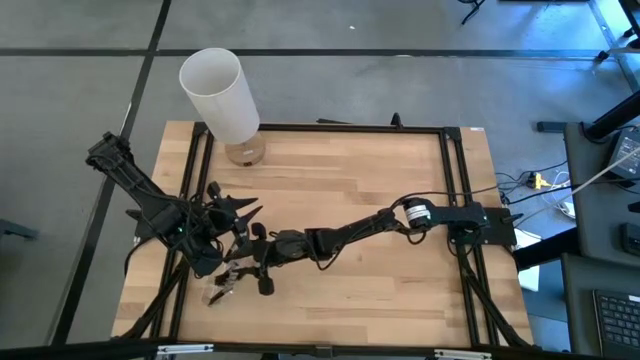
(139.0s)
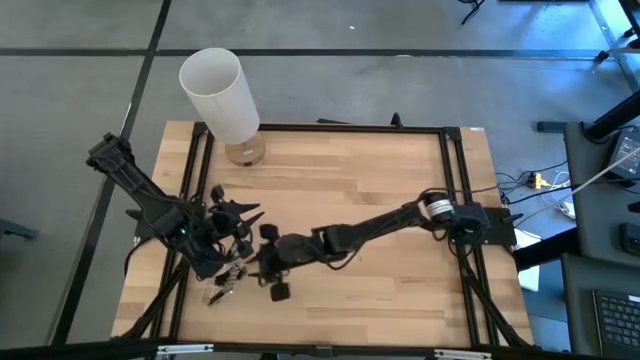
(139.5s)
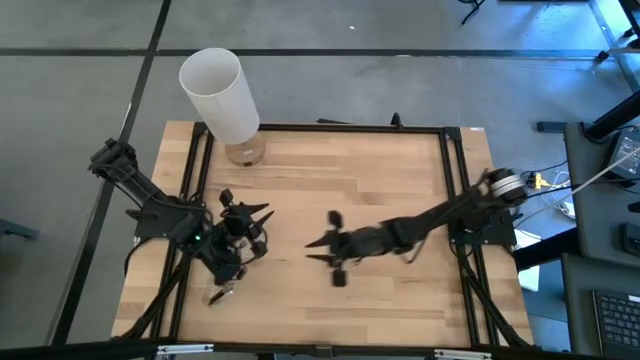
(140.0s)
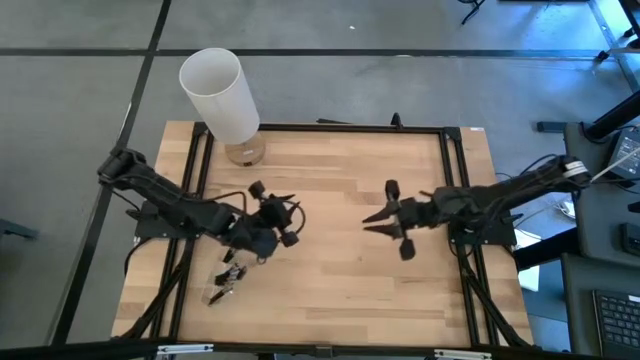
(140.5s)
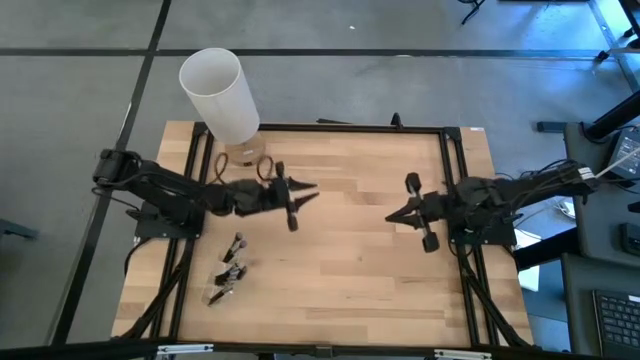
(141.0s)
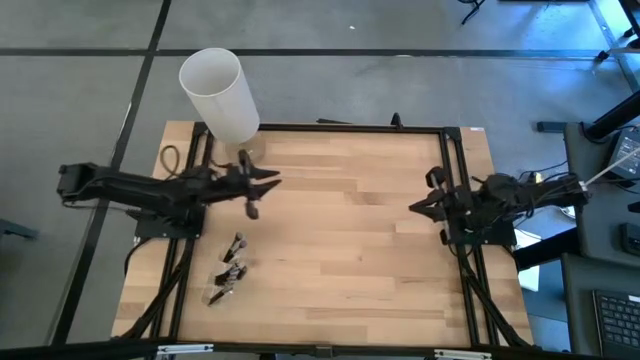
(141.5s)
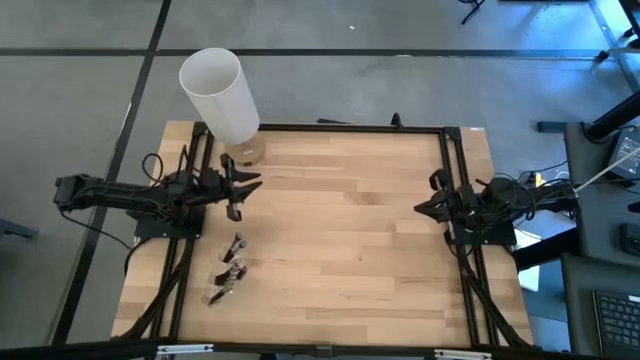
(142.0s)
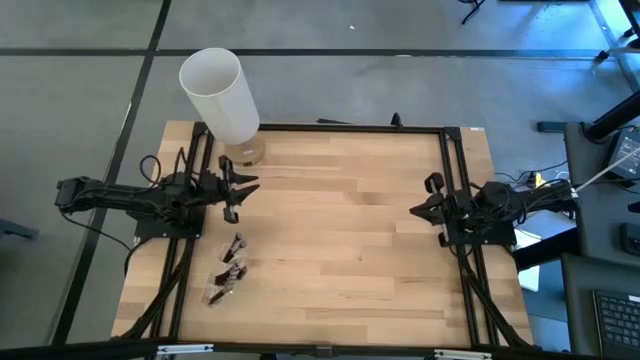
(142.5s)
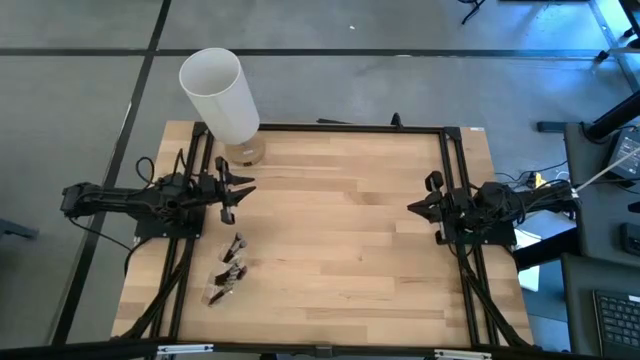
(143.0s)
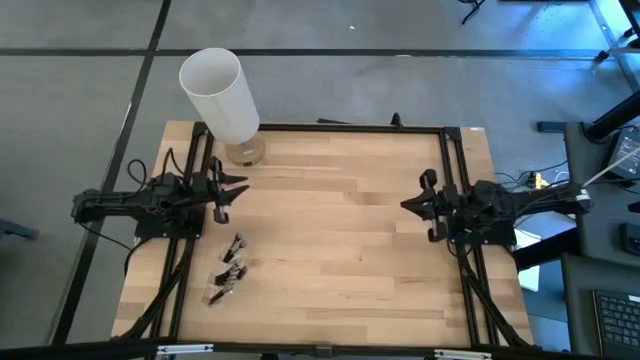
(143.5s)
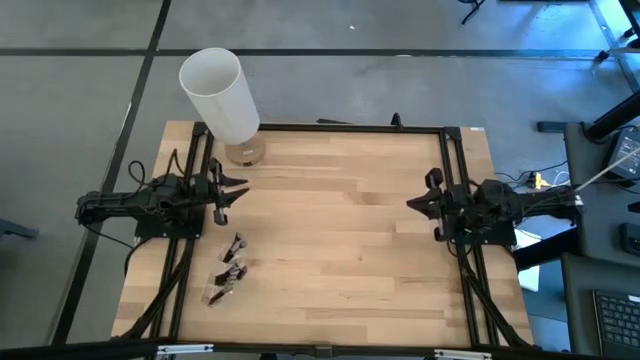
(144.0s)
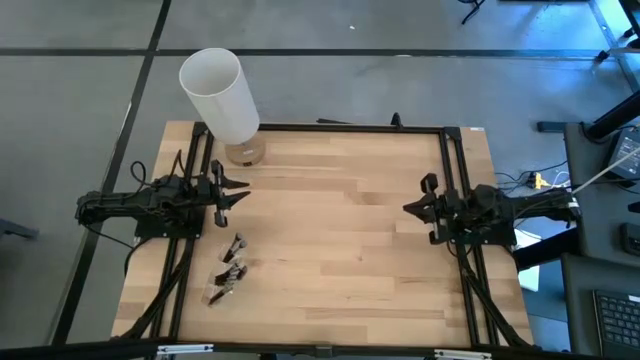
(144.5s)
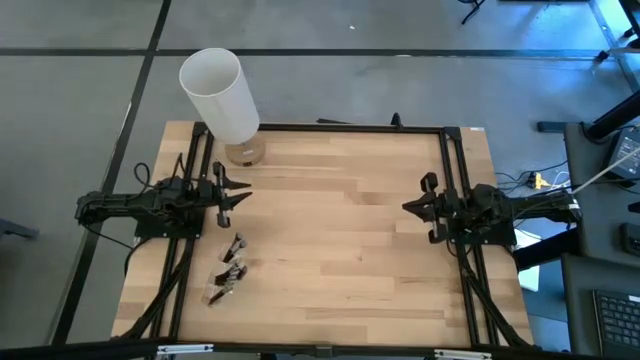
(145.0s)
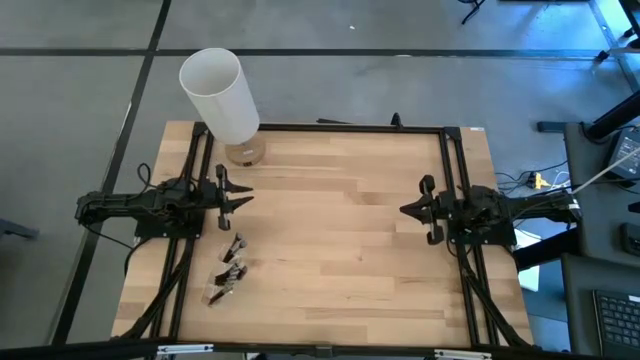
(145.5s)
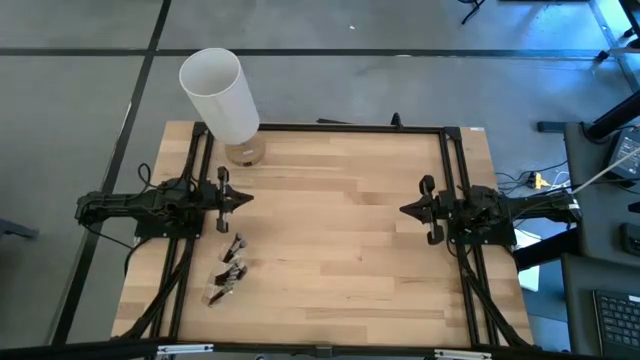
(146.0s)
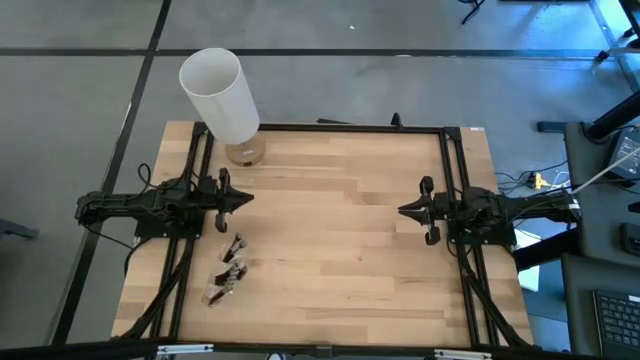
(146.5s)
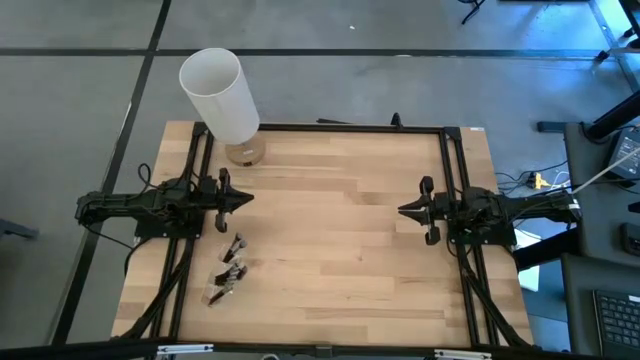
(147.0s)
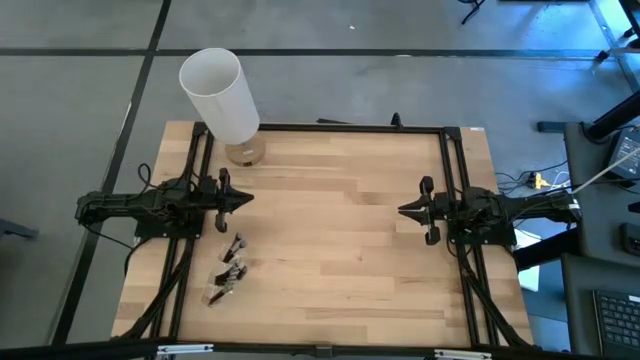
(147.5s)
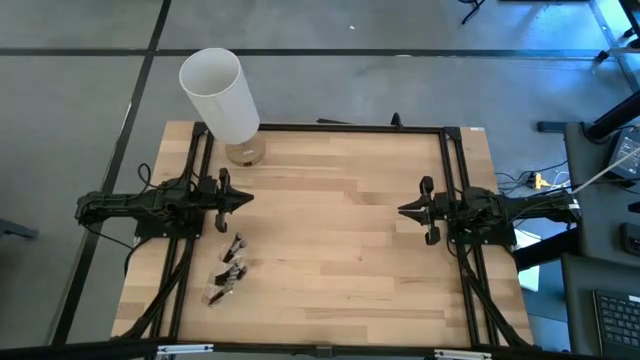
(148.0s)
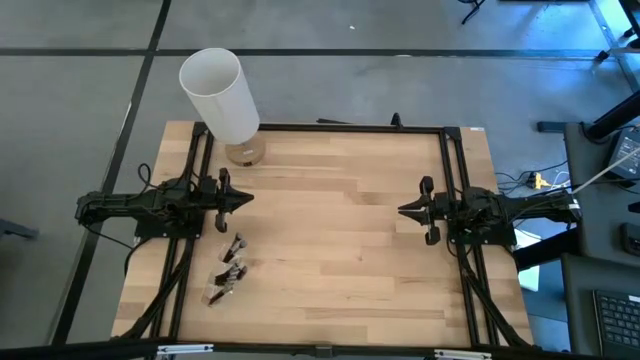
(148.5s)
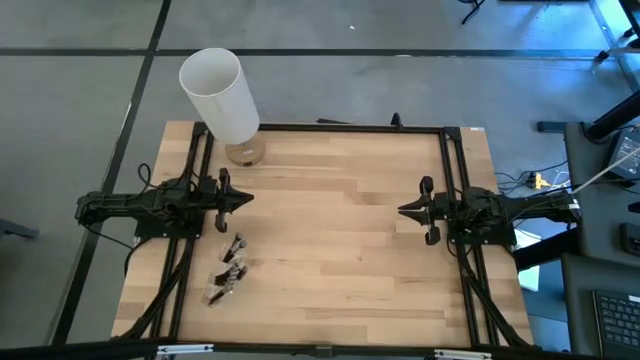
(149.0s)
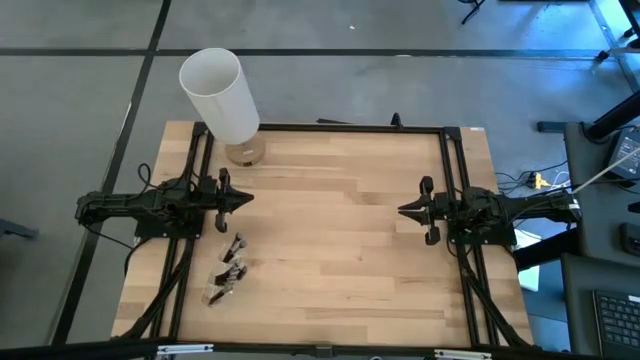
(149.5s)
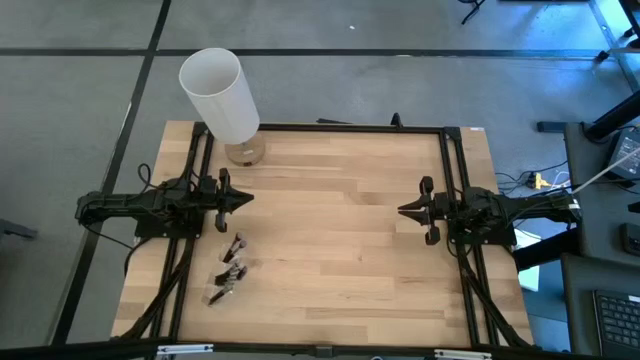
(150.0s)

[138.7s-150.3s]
Task: Put items in baskets/containers
Return to Home Position

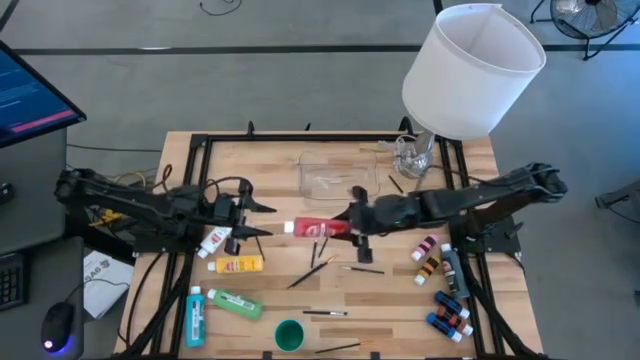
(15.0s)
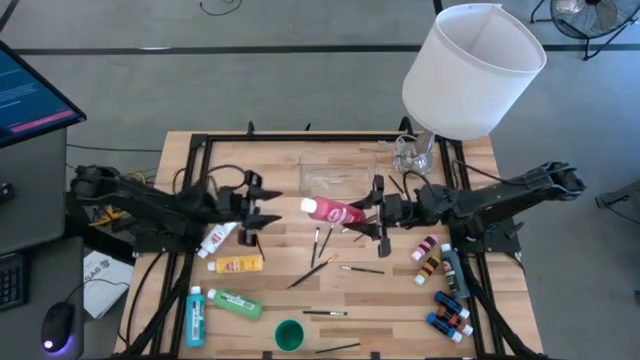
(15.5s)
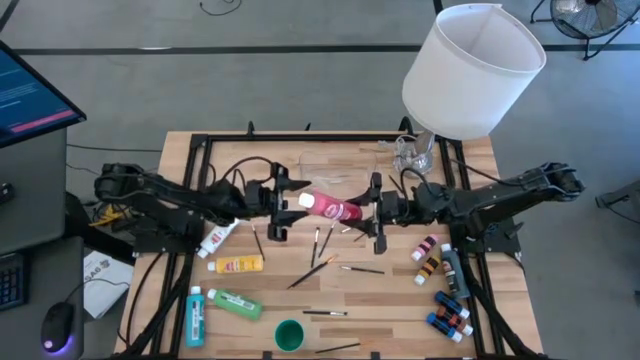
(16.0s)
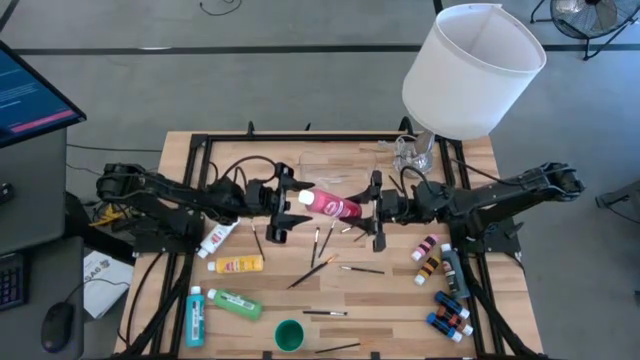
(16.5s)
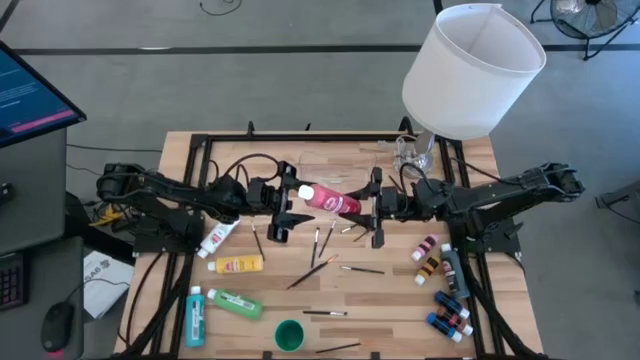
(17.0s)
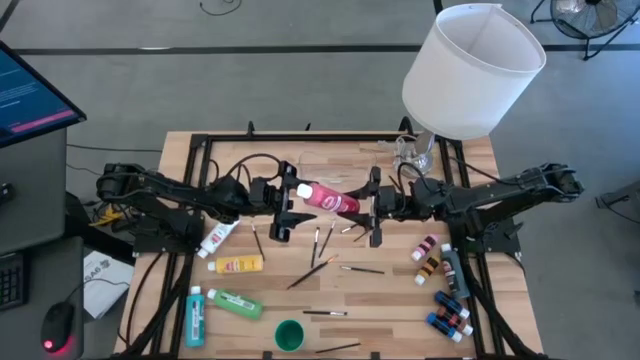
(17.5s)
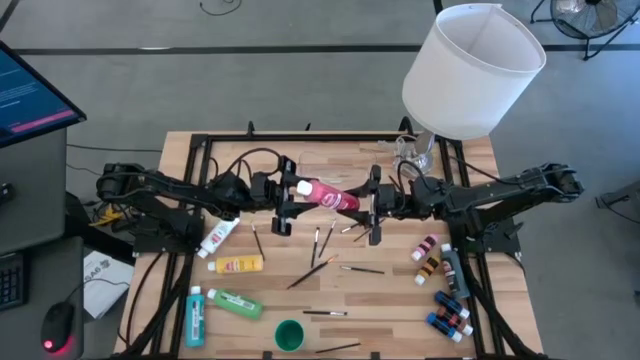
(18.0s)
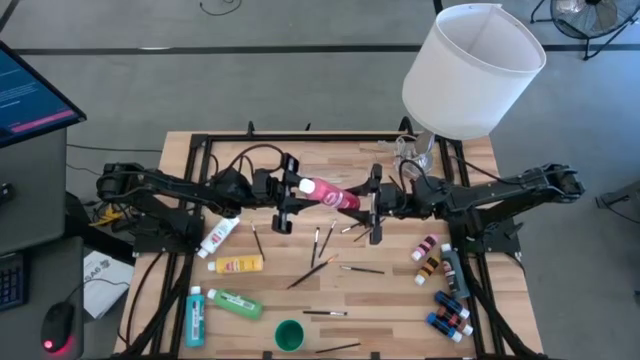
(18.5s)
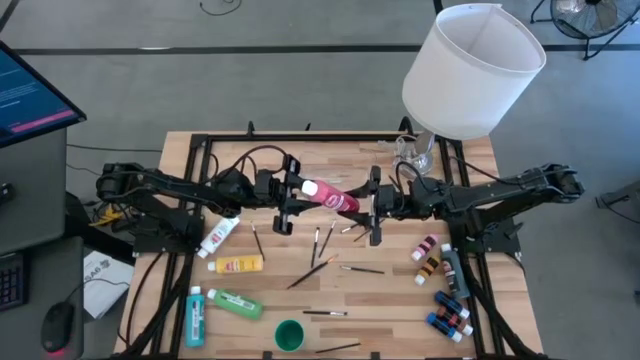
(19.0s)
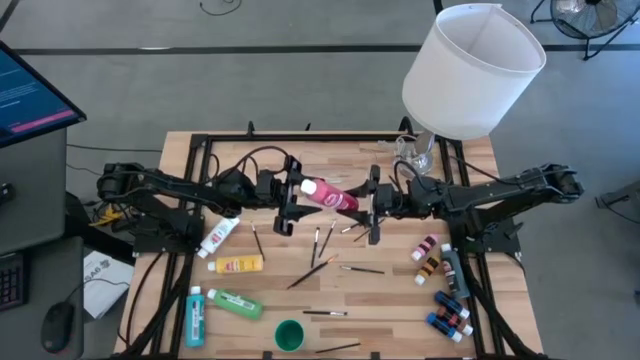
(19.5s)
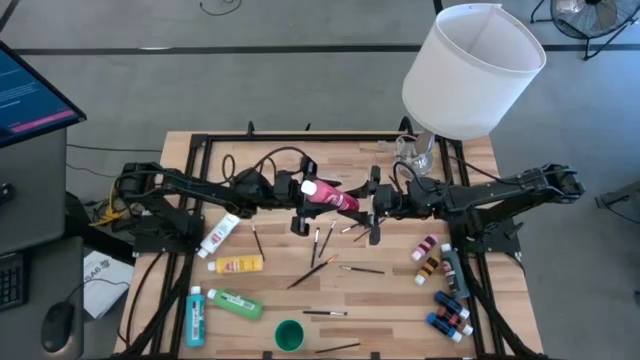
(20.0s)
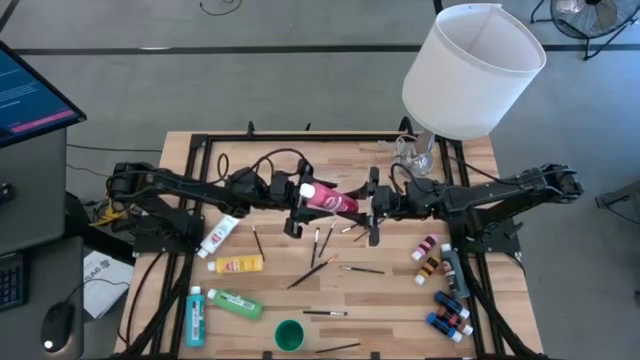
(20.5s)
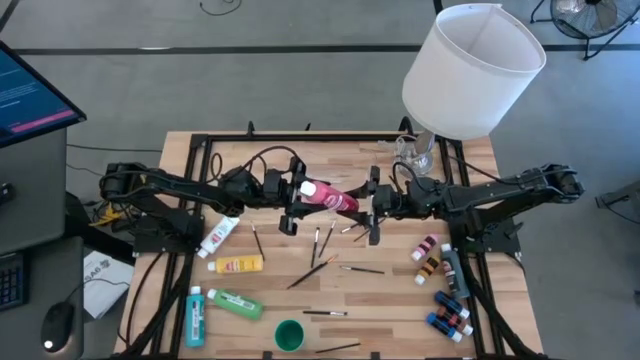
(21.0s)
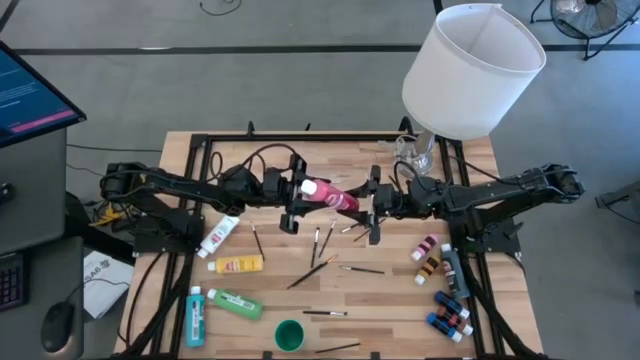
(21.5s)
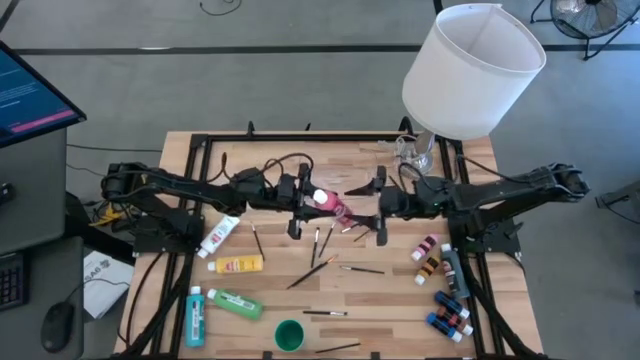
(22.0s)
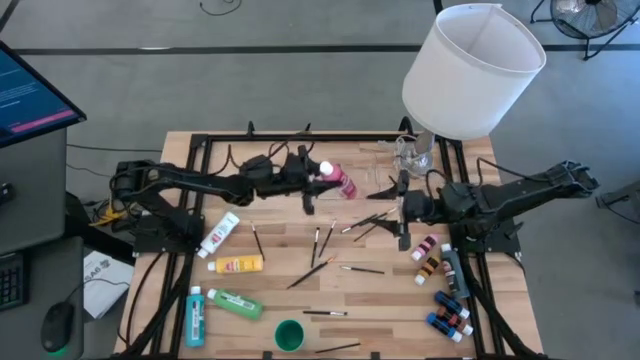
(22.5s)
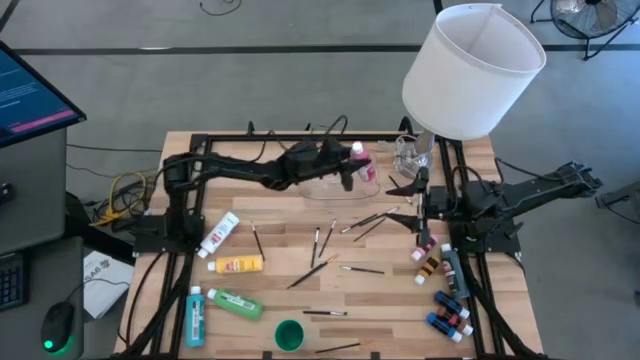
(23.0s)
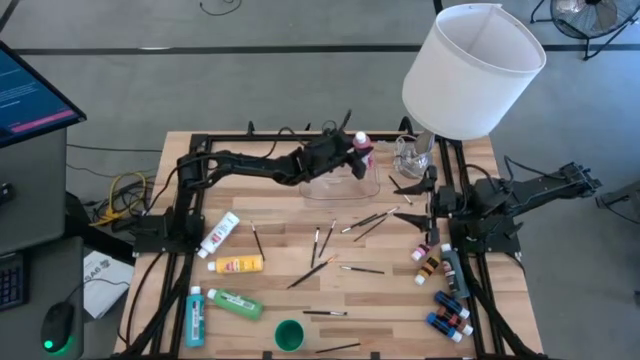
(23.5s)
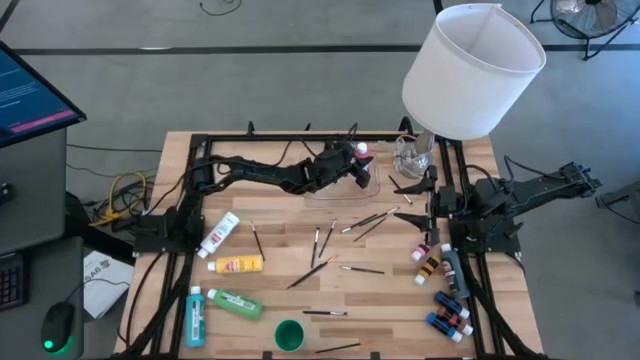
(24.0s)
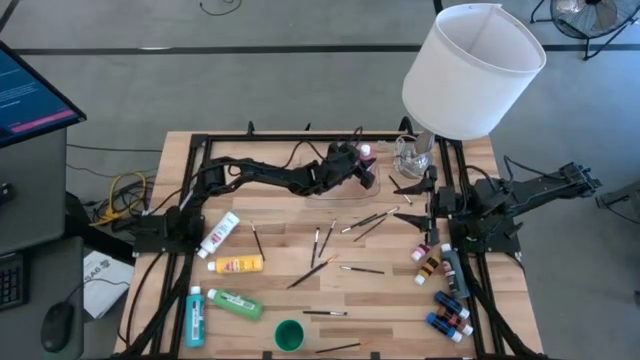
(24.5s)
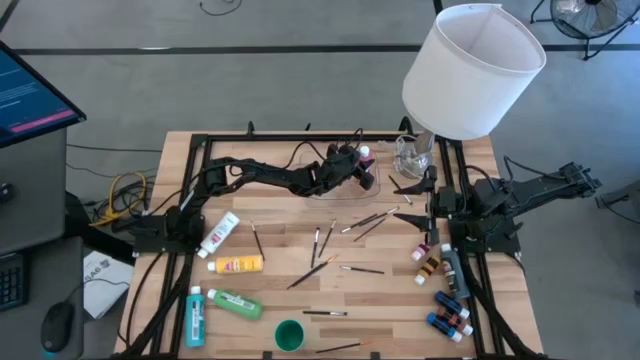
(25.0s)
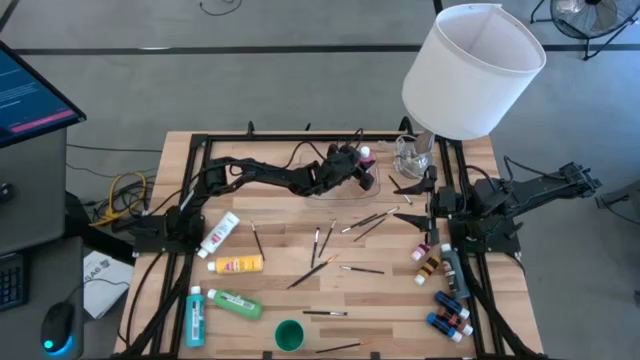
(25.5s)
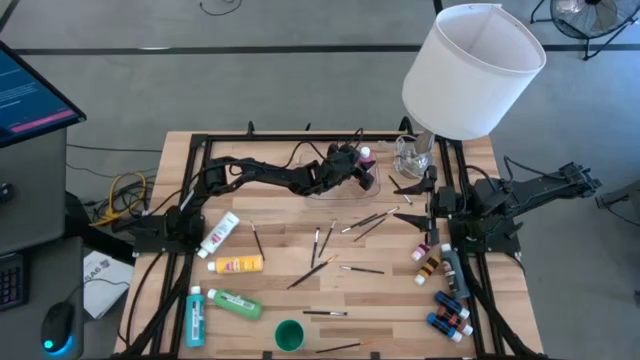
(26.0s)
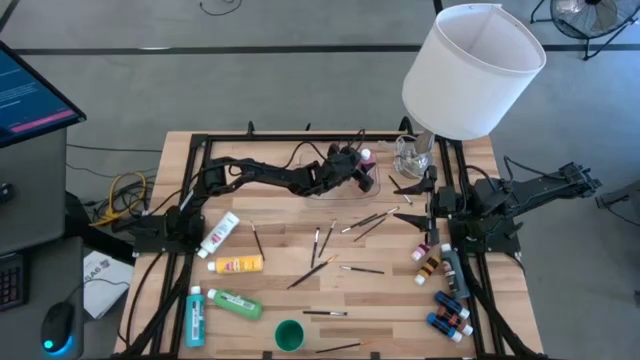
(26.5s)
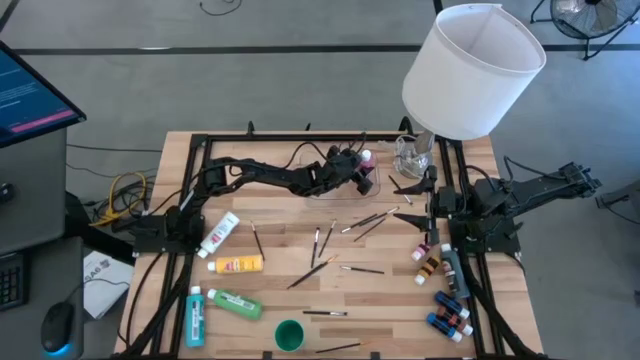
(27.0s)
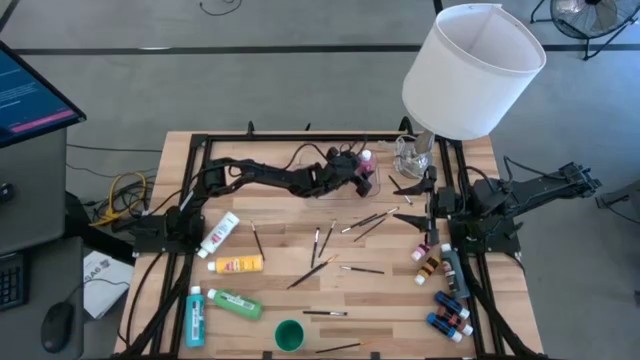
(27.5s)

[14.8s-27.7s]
Task: Pick & Place Paint Supplies
Put the big red paint bottle into the transparent bin
